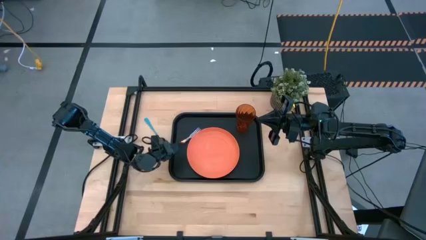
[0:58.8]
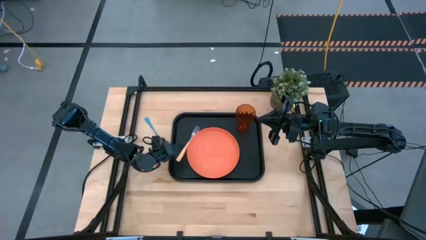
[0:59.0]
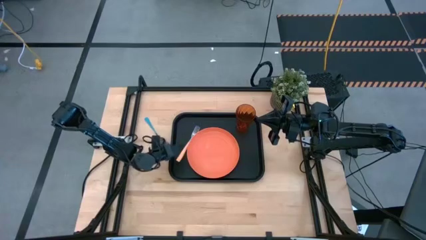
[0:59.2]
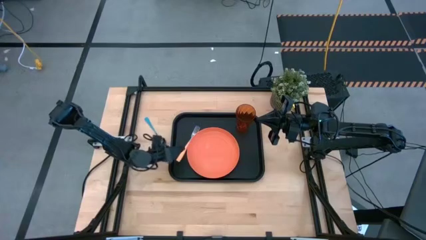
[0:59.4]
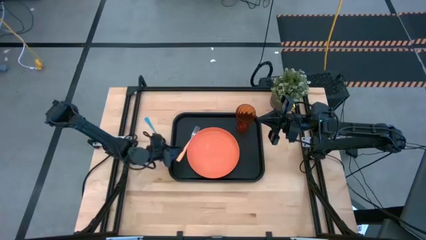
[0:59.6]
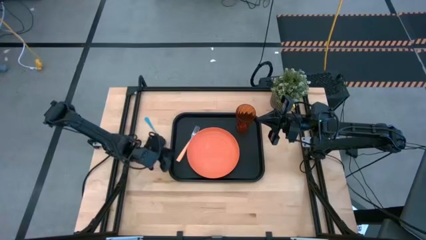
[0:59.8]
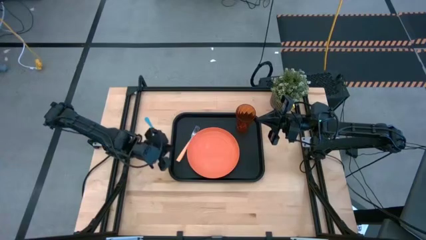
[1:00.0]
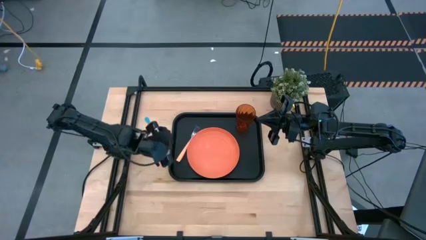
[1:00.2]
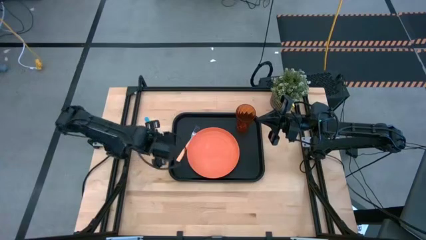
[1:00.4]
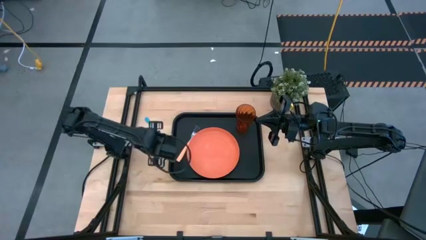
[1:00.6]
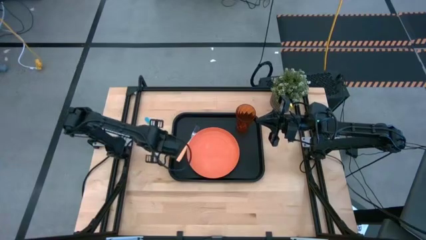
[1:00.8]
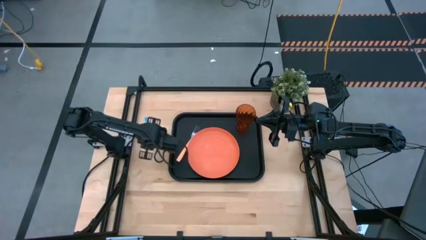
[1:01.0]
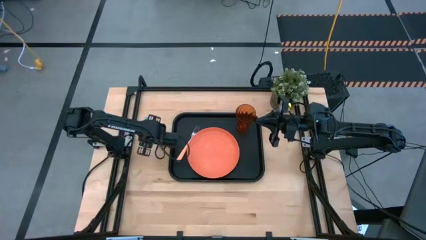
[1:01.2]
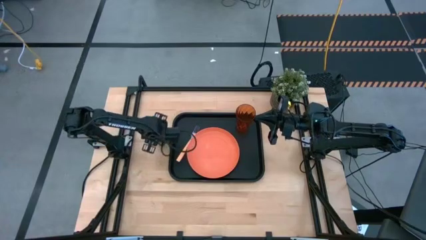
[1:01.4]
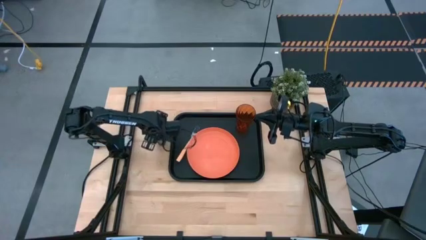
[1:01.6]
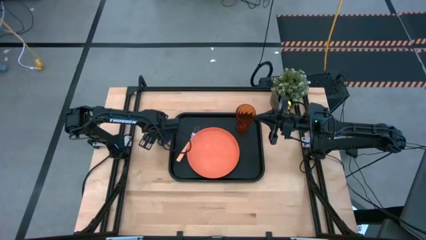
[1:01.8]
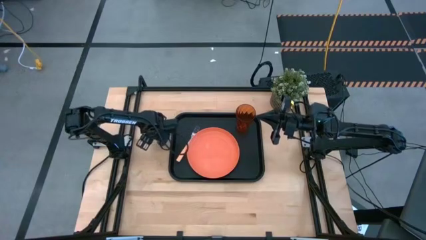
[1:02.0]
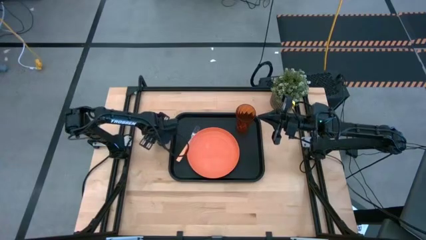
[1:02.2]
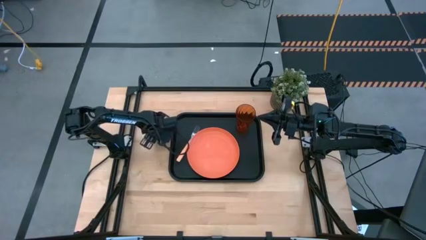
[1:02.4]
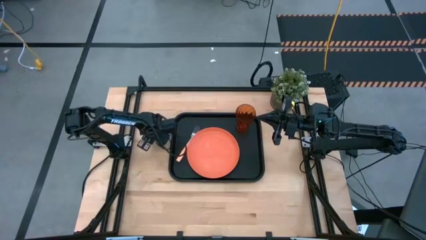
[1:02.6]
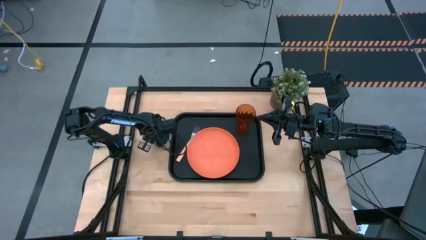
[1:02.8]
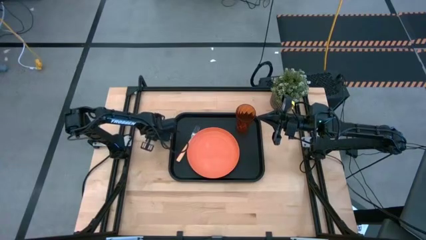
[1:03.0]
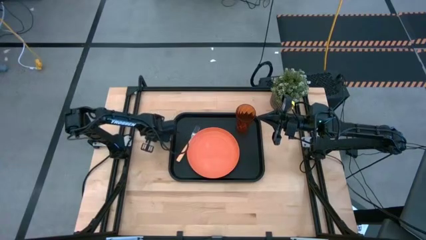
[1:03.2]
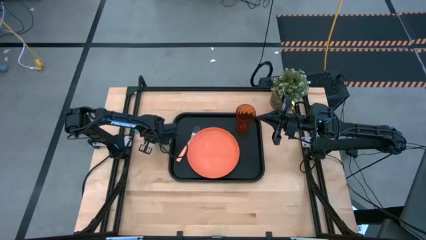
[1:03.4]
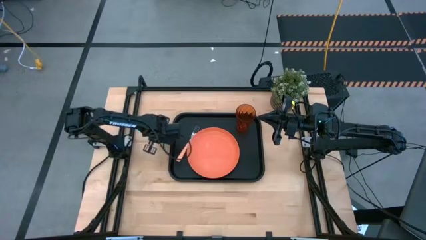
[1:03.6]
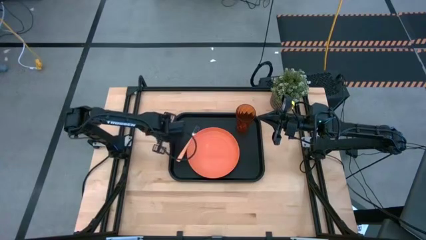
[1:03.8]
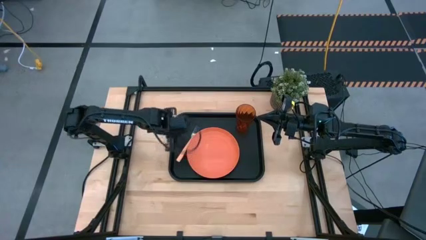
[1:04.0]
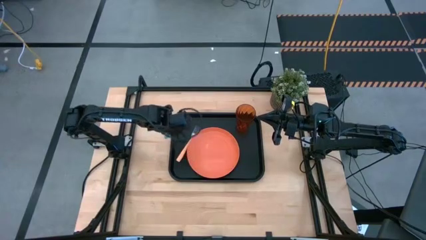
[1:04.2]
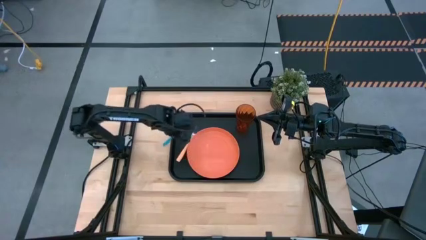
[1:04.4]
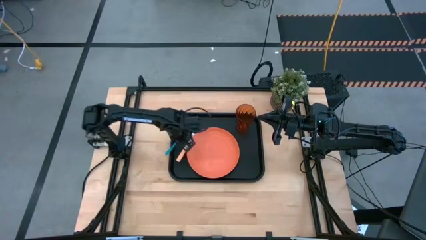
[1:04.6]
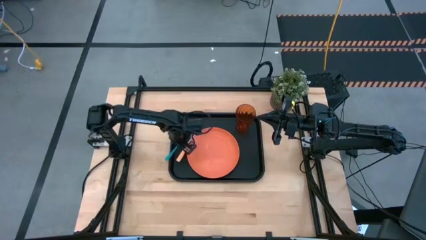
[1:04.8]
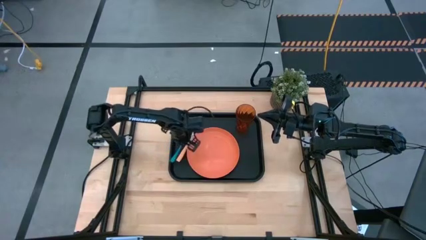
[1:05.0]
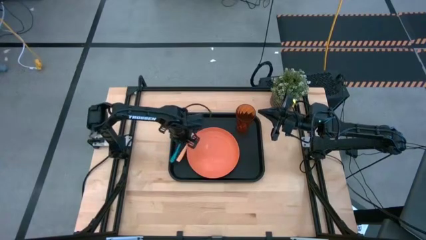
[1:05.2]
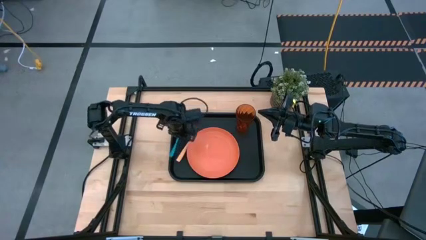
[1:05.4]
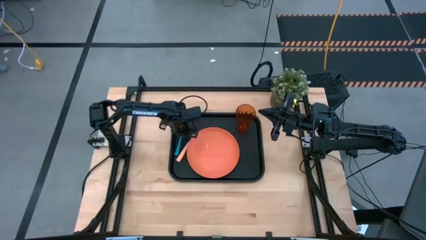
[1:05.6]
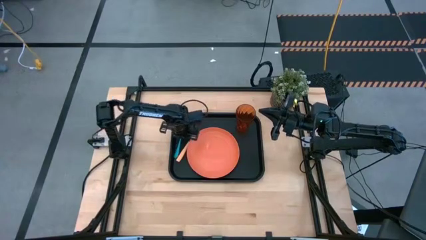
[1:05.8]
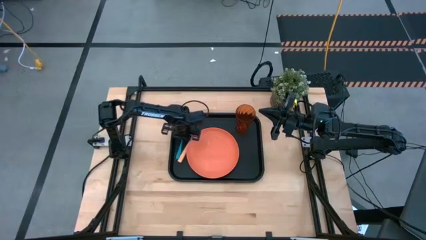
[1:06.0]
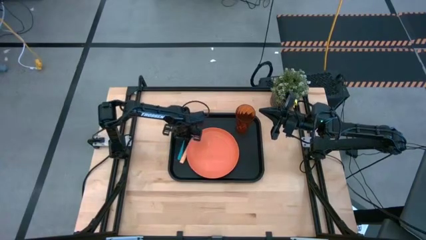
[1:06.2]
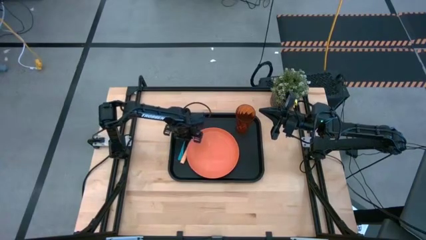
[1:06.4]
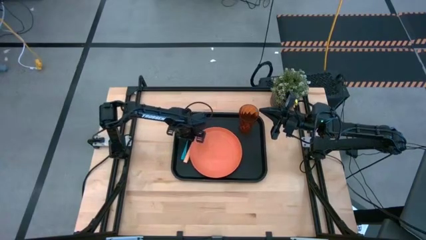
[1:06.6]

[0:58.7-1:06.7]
Task: Pick and place plate/cup/fork/spoon on tray
Put the blue spoon on the black serving tray to the left of the orange fork

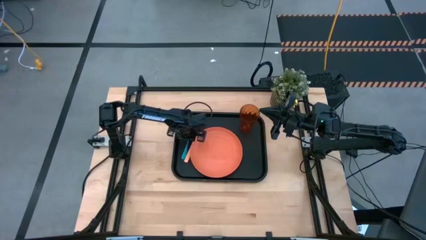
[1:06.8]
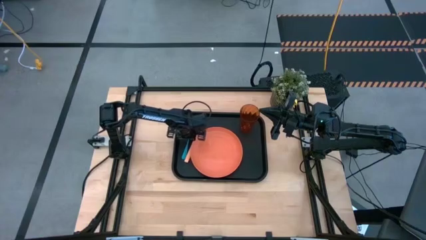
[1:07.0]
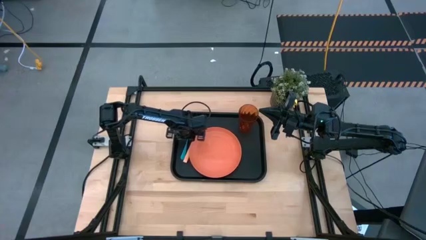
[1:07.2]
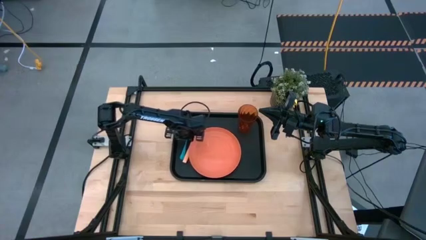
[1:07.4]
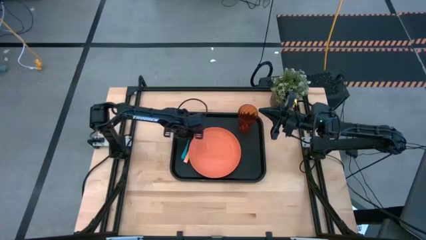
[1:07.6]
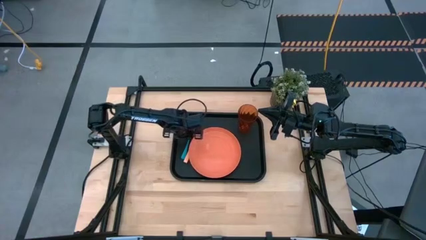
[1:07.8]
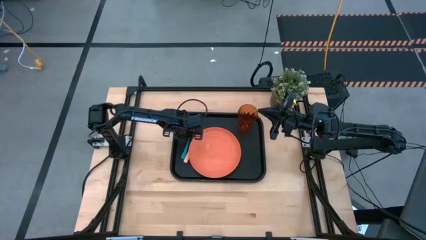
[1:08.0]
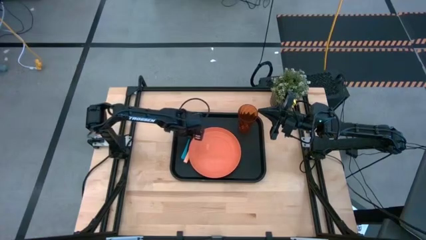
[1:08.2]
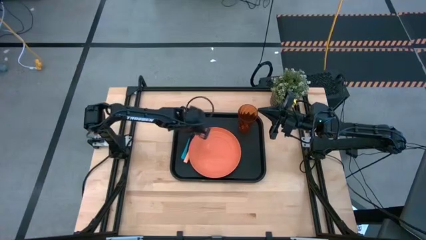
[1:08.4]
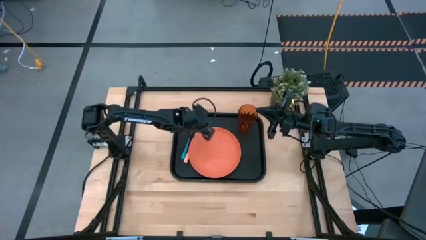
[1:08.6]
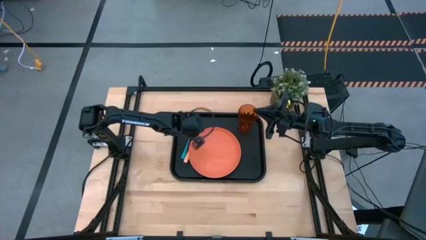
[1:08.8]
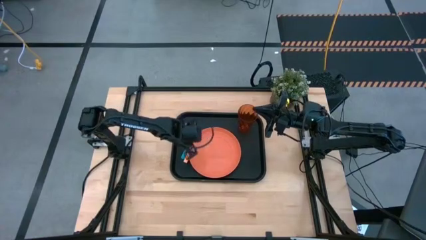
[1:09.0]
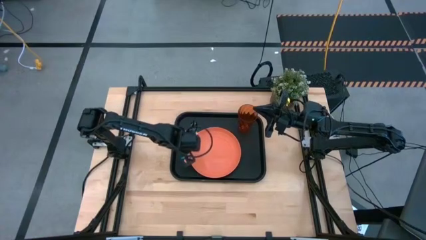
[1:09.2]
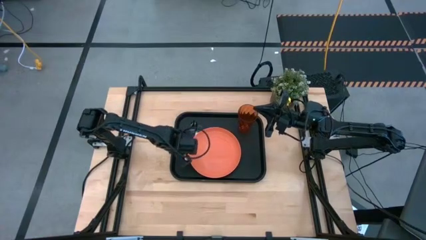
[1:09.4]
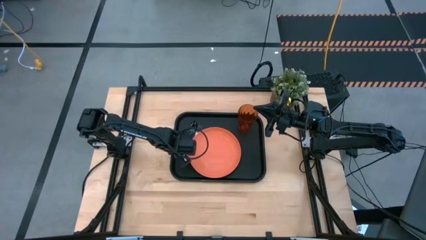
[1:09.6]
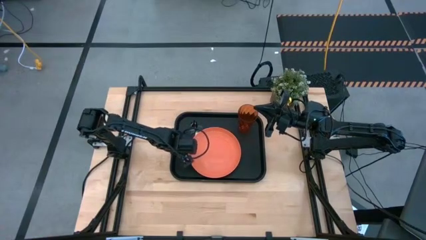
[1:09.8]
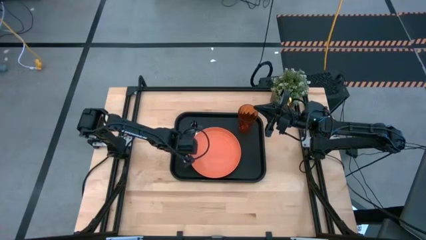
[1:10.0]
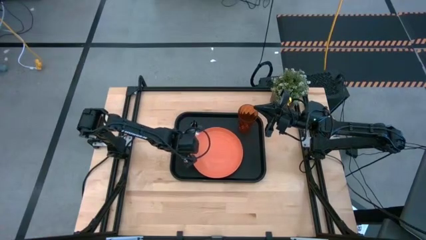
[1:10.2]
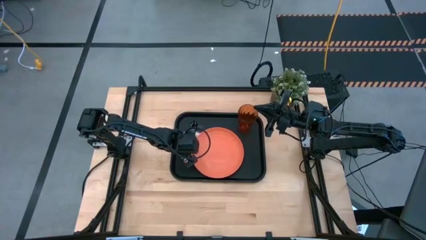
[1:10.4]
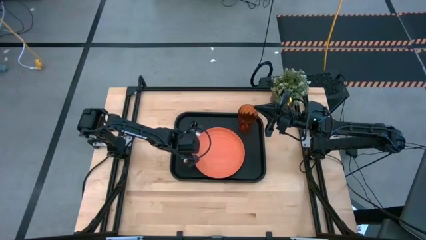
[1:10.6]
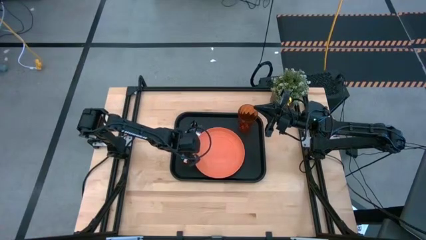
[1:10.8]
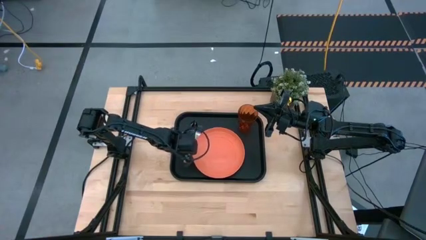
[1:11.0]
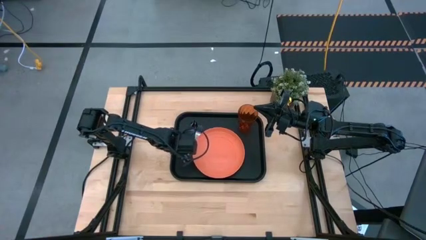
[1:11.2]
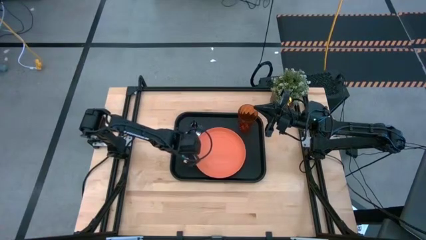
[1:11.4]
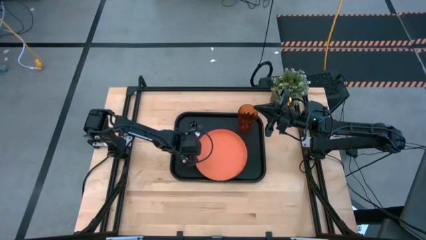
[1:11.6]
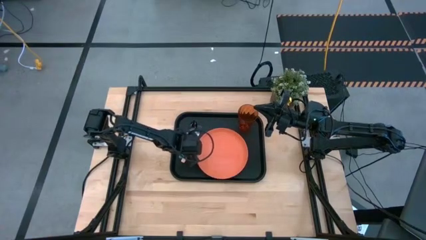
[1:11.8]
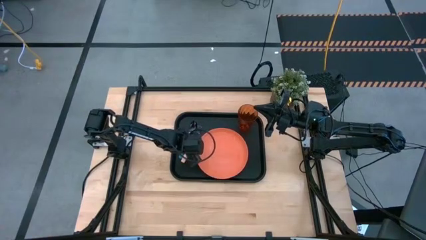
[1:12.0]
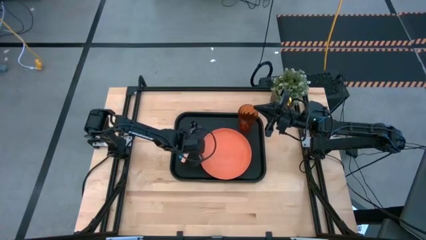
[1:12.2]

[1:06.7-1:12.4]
Adjust the orange plate on the black serving tray
